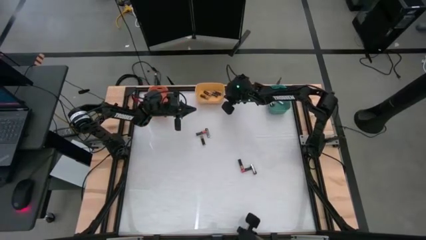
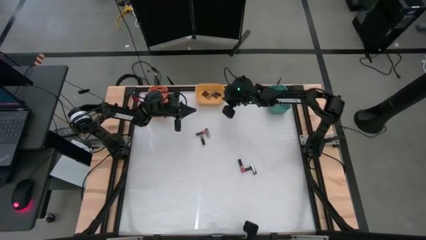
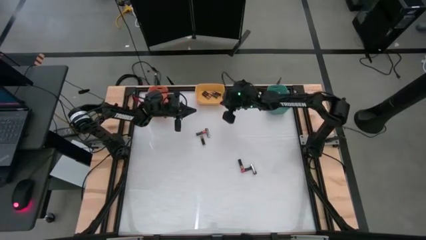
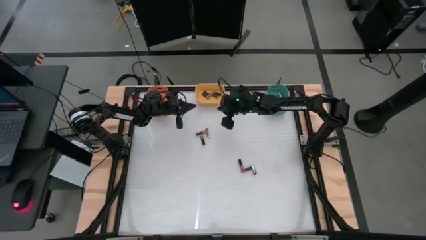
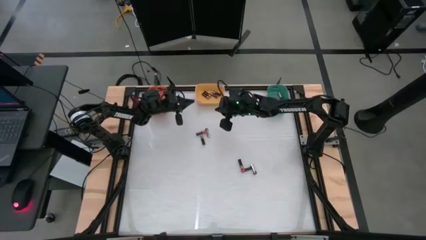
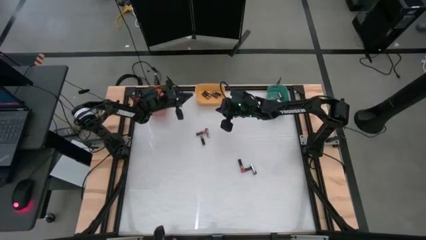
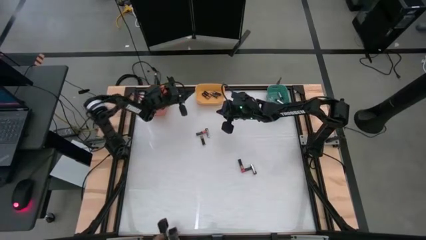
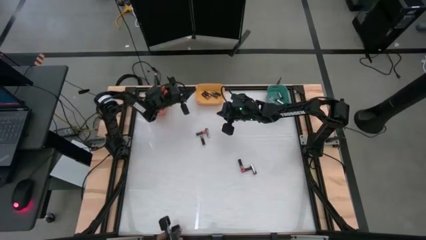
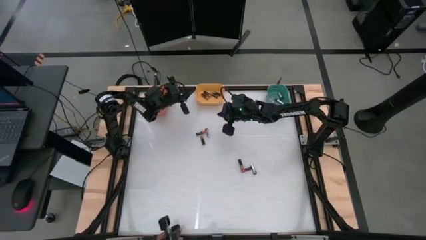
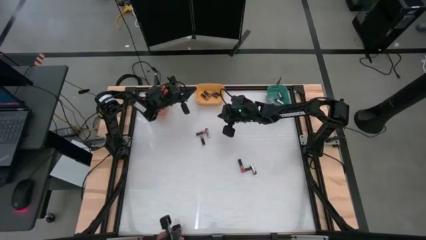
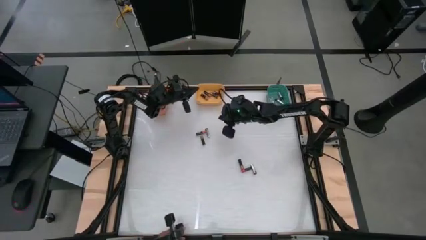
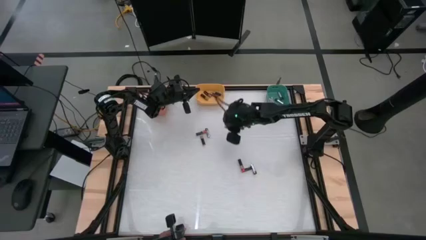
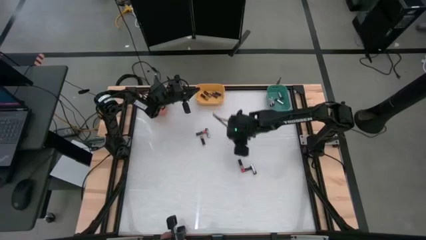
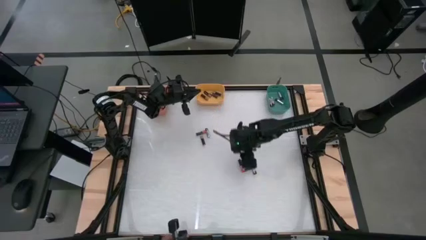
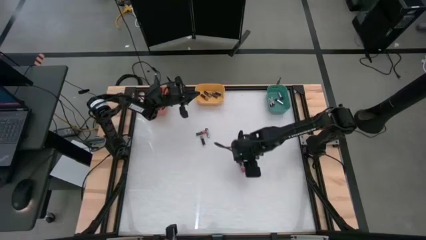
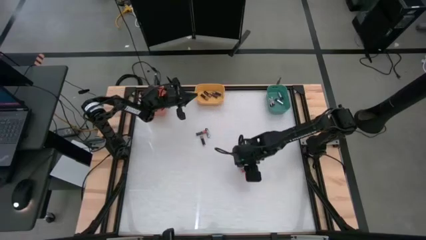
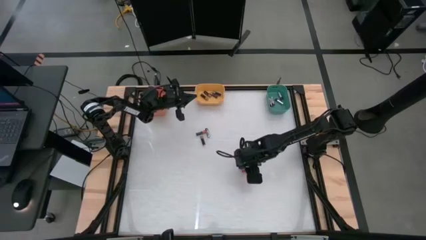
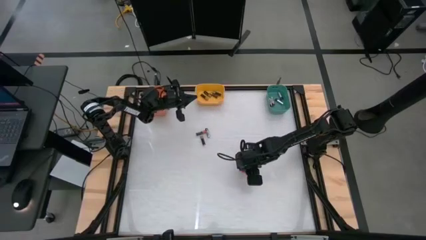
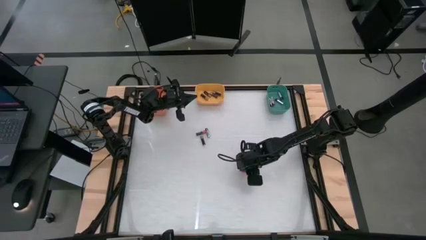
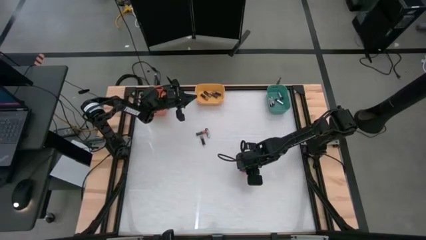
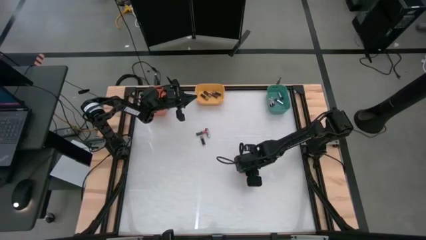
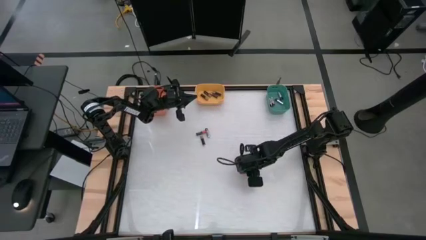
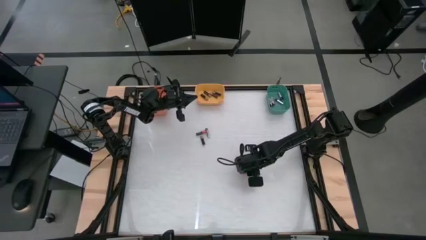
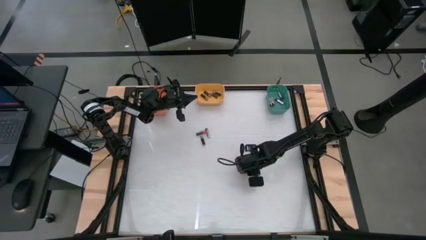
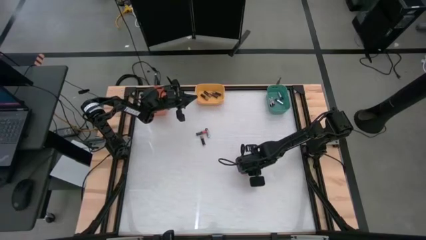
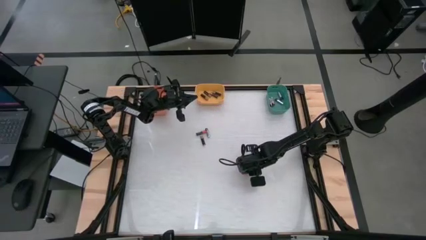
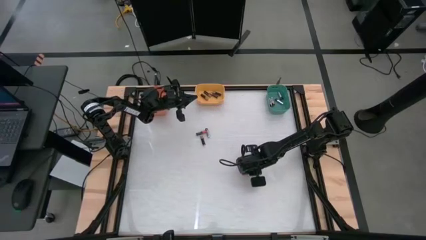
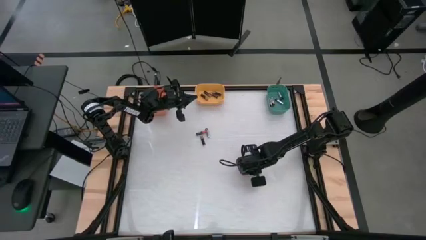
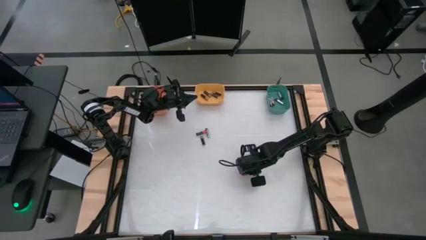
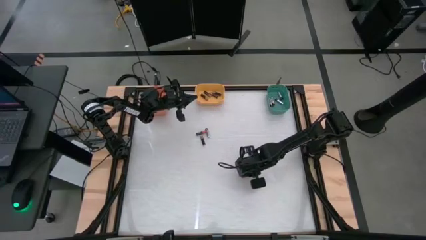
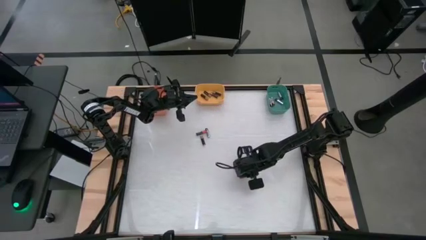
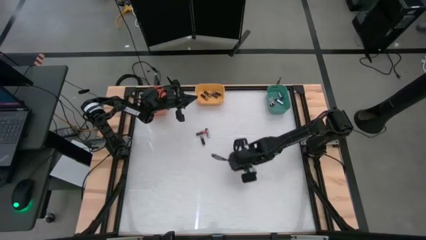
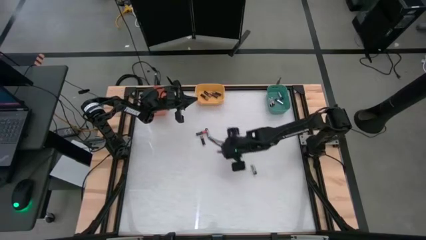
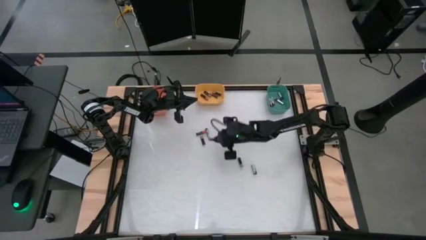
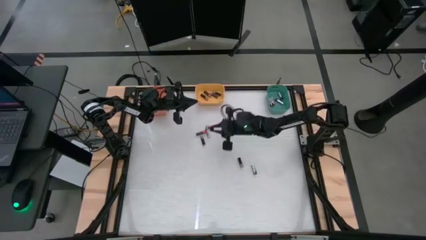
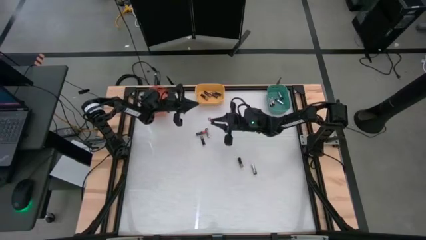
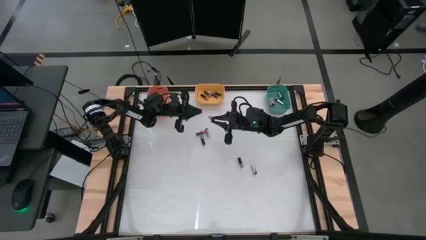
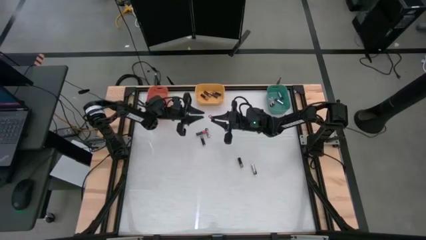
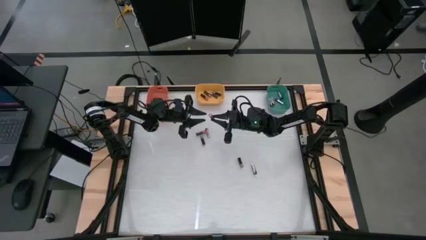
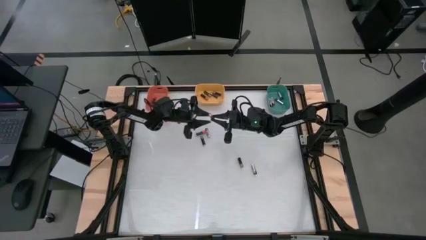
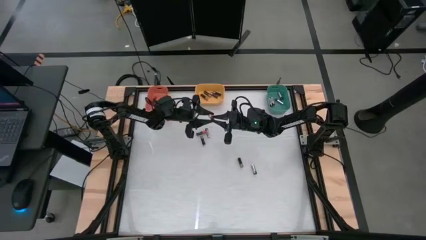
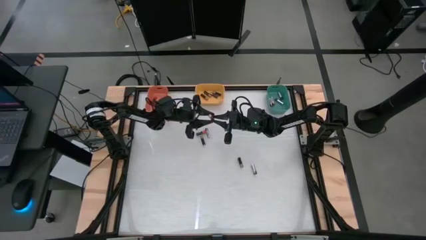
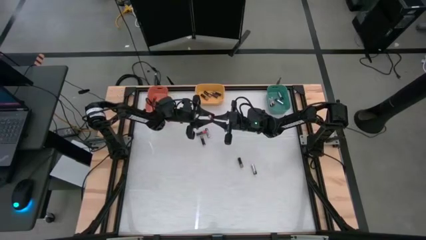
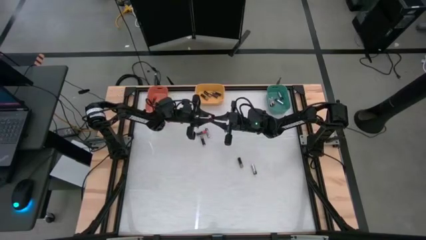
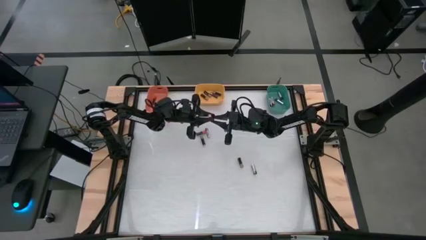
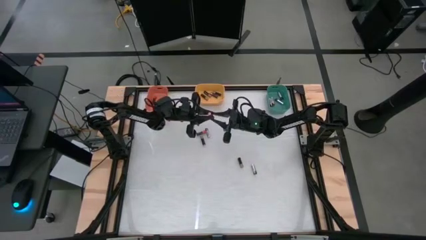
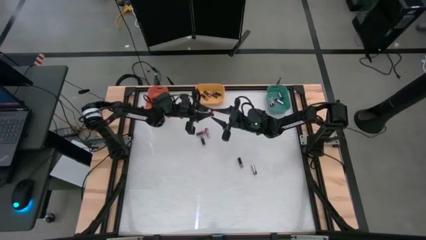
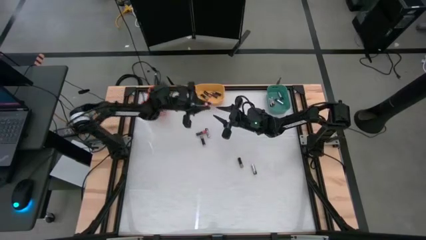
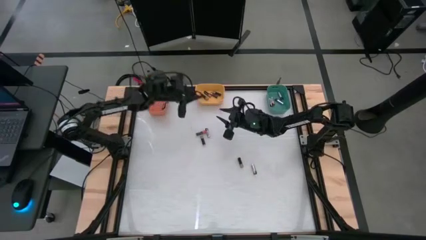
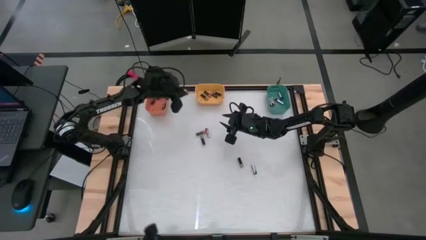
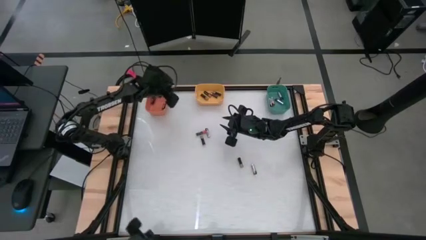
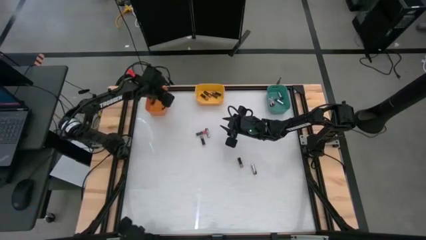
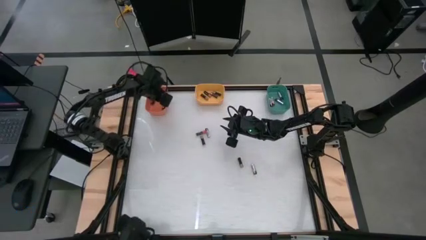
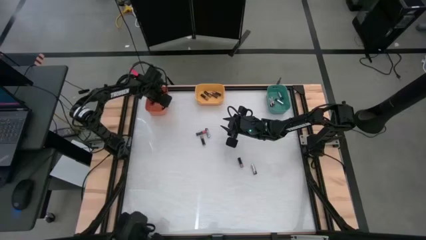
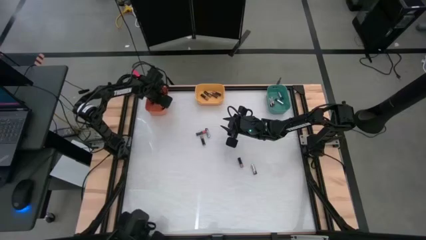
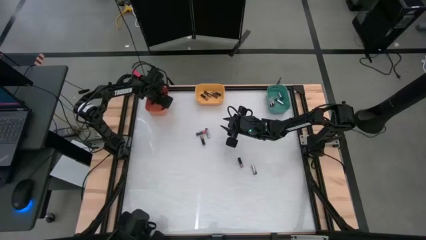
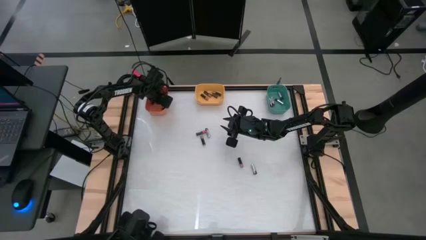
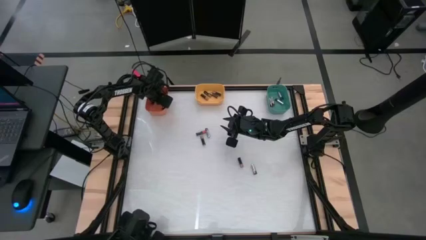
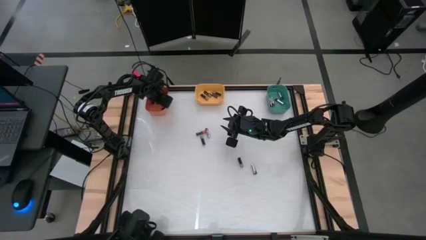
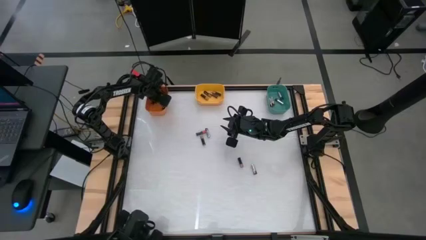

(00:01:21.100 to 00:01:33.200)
Task: Sort batteries
Put the red battery into the orange bin

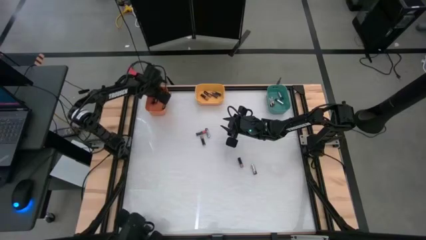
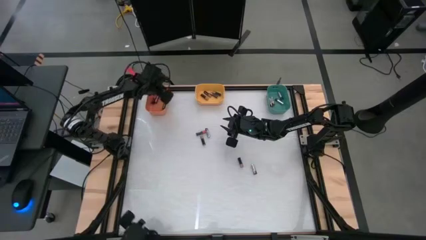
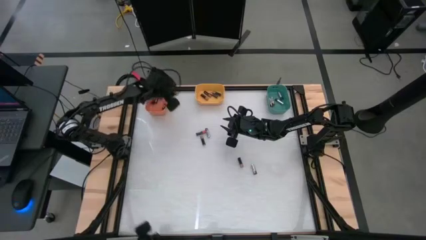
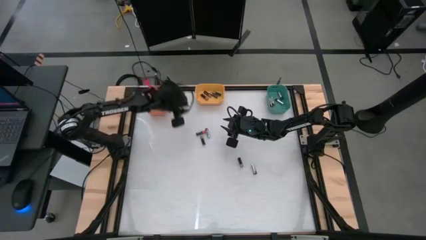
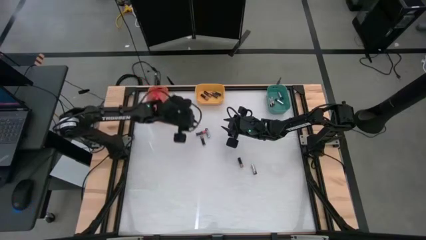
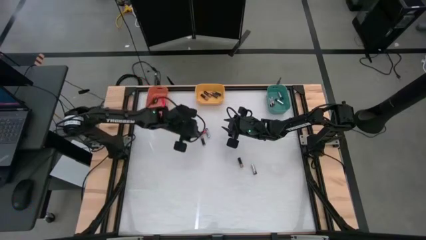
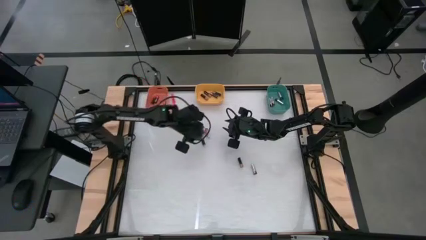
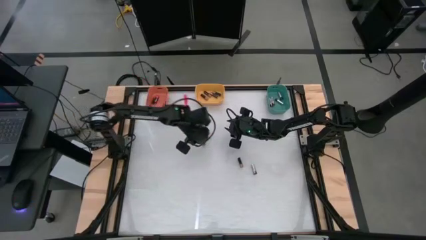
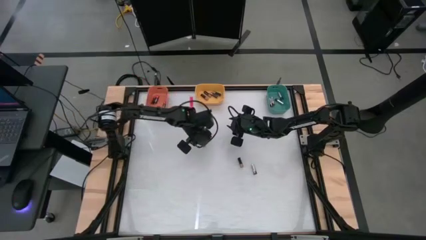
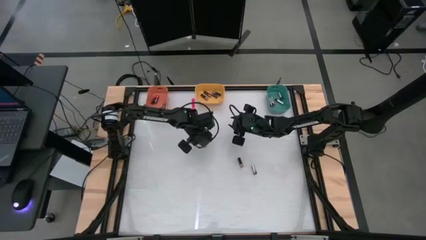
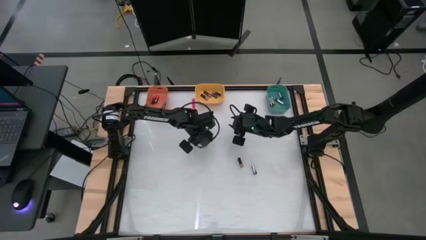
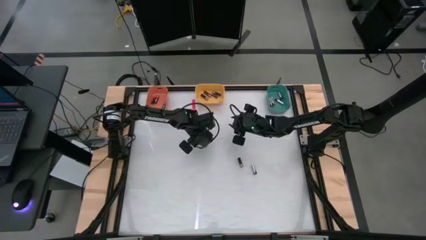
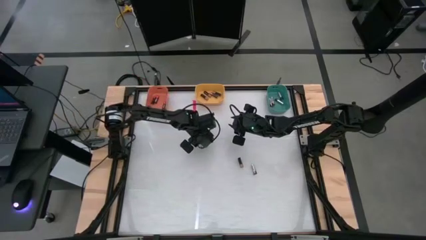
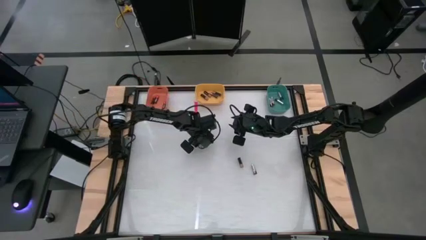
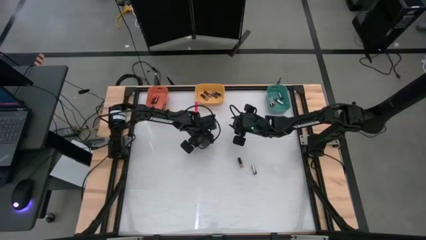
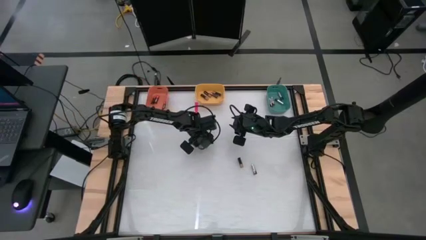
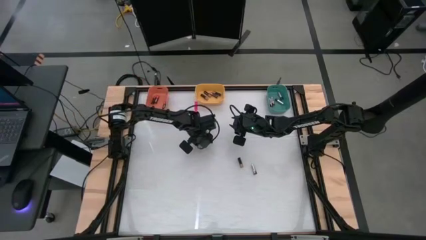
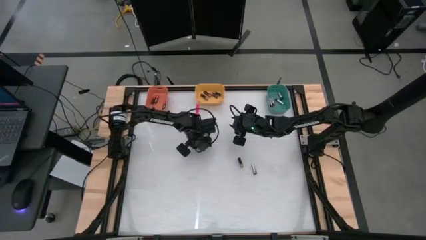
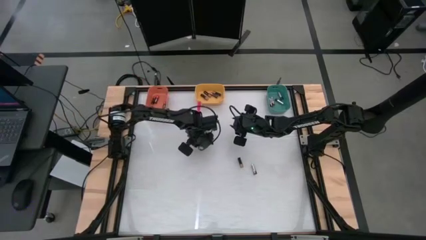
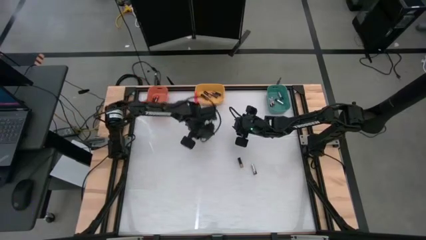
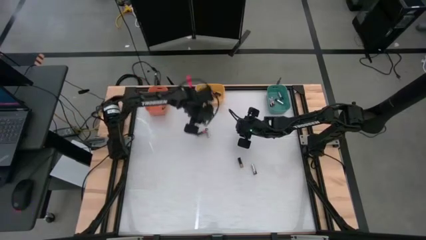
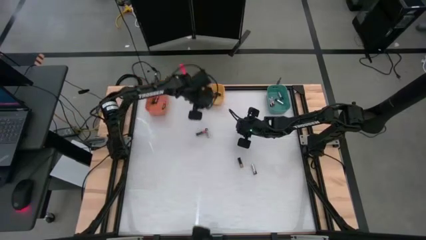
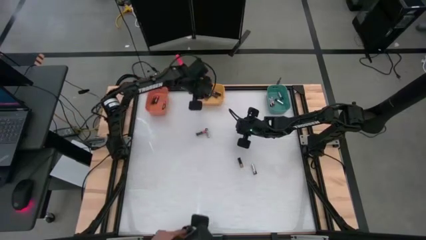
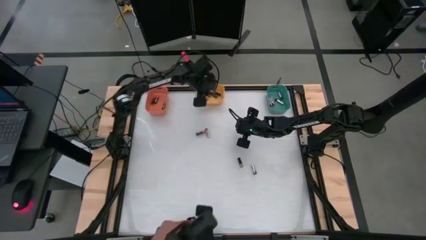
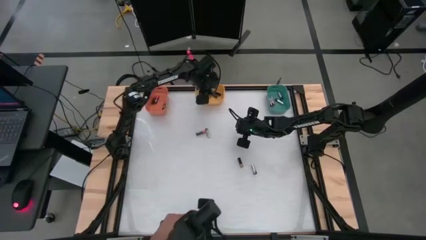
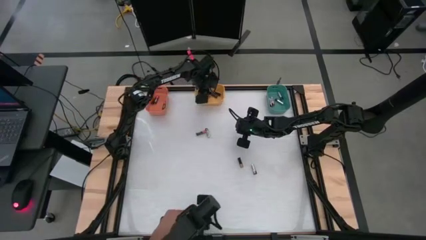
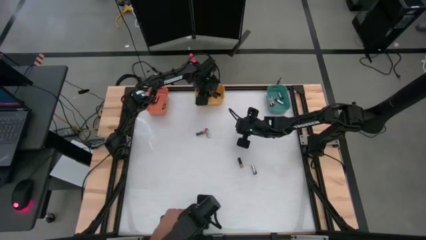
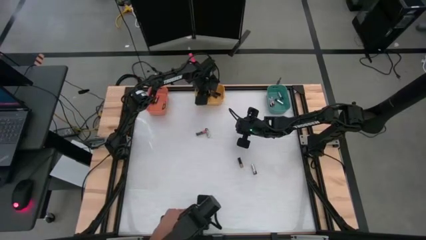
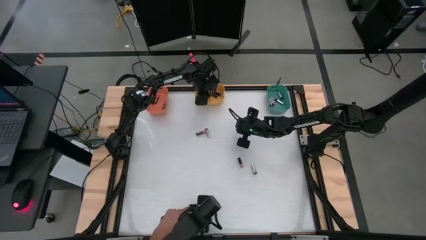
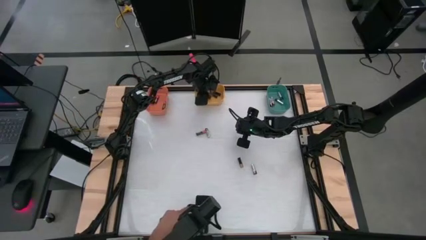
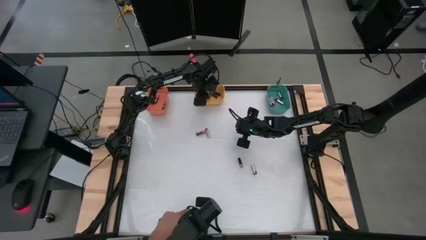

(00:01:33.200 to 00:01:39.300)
Put the gold battery into the yellow bin
